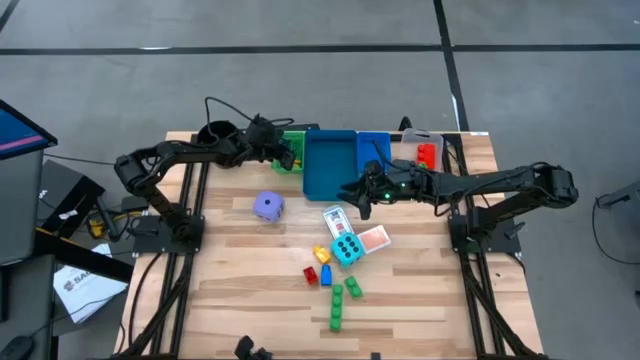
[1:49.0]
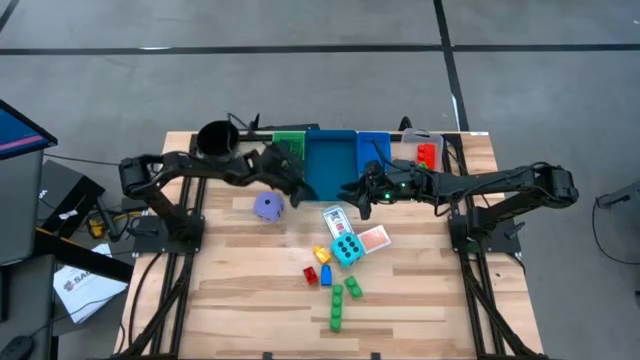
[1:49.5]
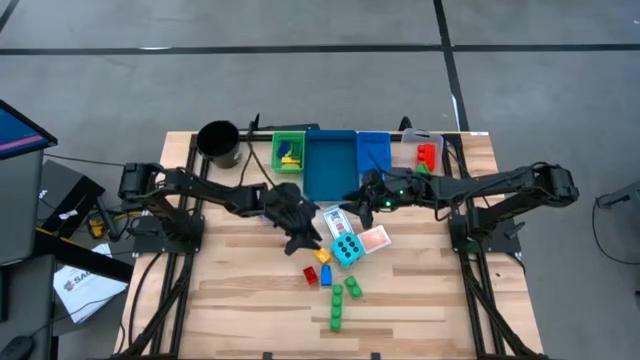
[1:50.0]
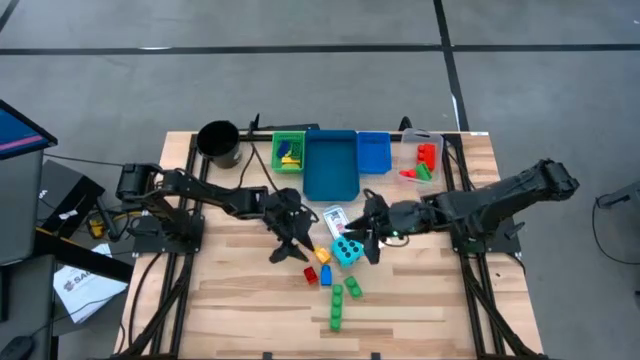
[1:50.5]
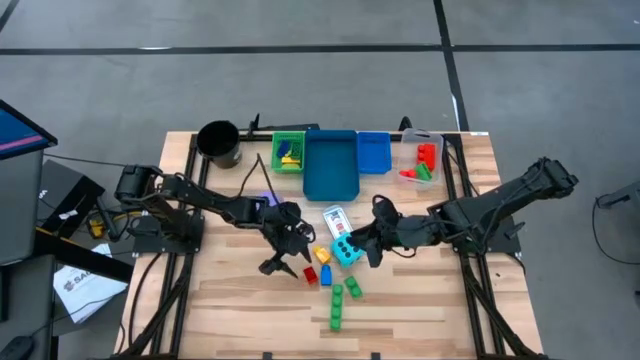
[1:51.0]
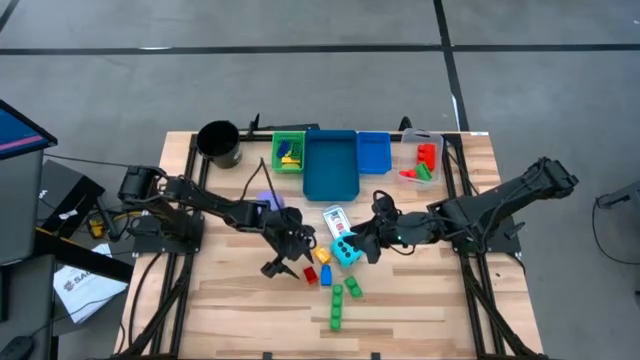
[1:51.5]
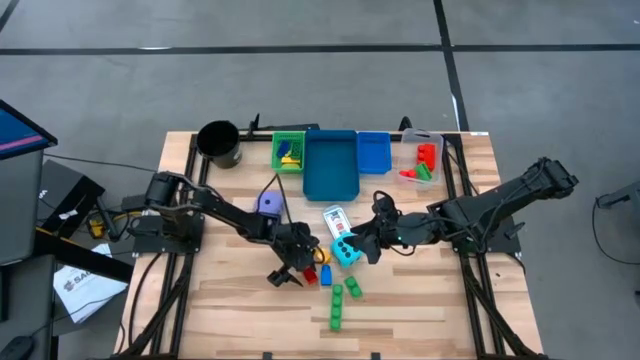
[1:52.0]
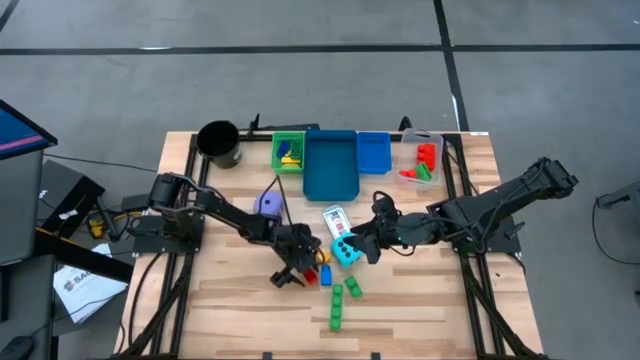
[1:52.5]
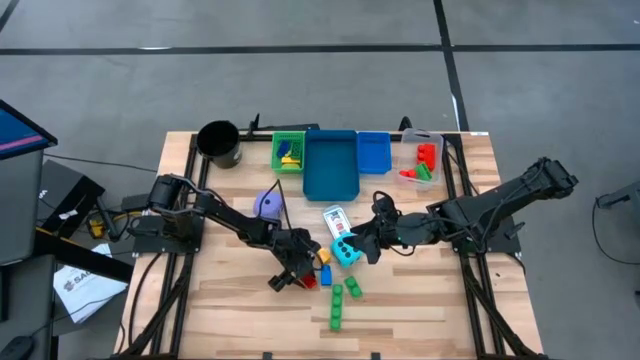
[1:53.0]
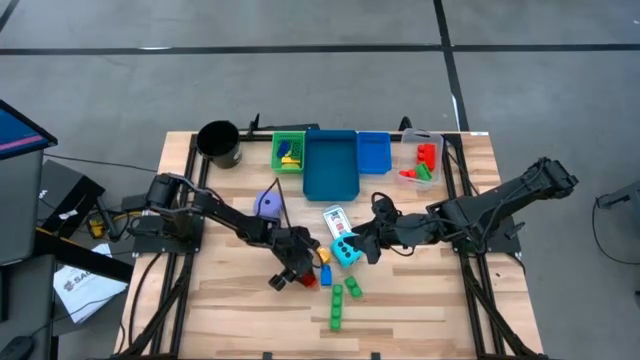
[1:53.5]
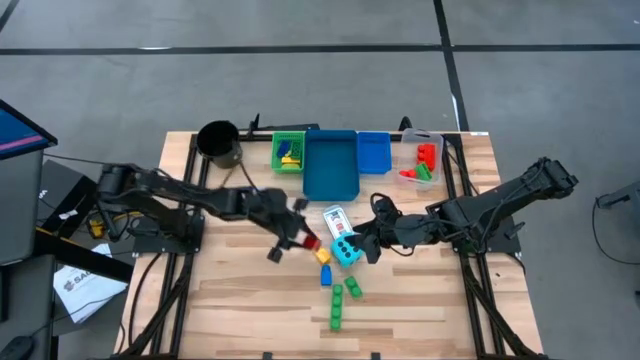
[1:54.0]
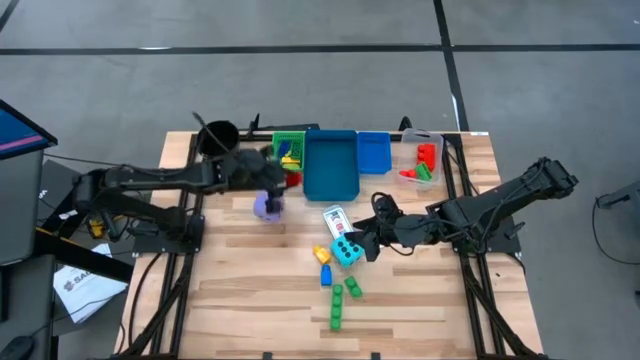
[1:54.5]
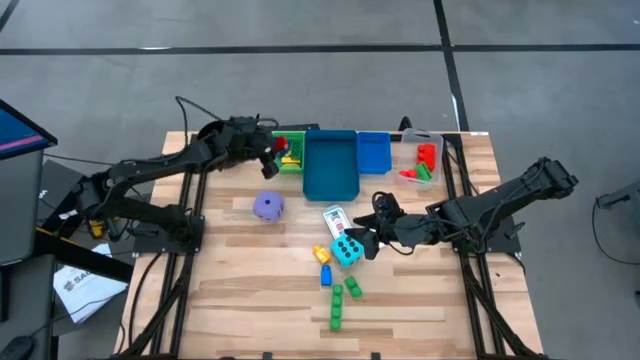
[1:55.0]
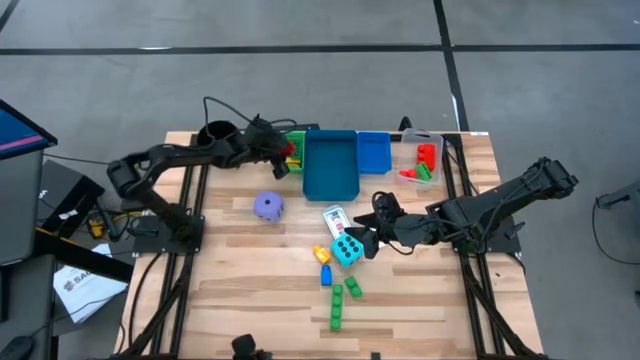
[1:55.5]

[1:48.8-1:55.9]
Task: Pick & Place Toys
Put the small red game piece into the green bin

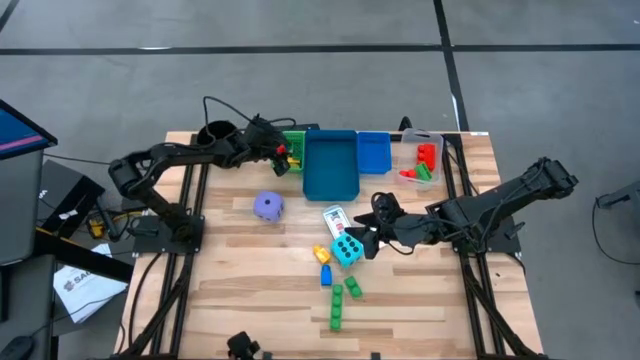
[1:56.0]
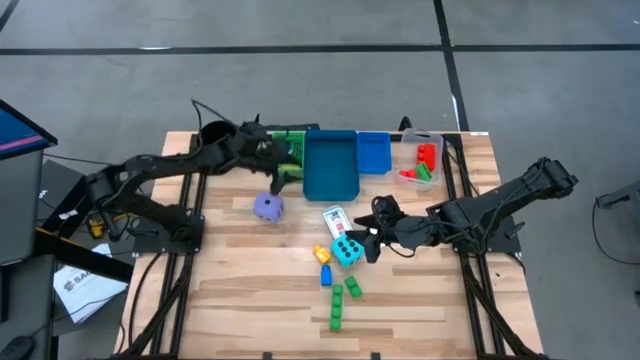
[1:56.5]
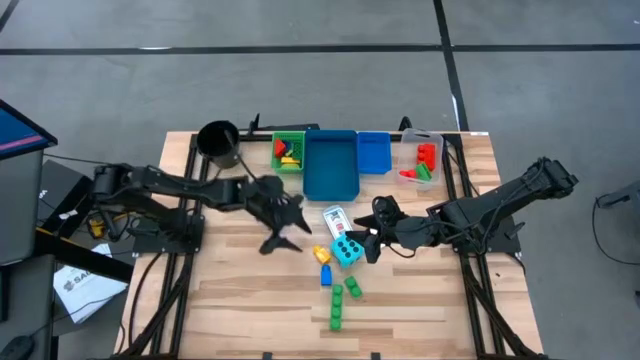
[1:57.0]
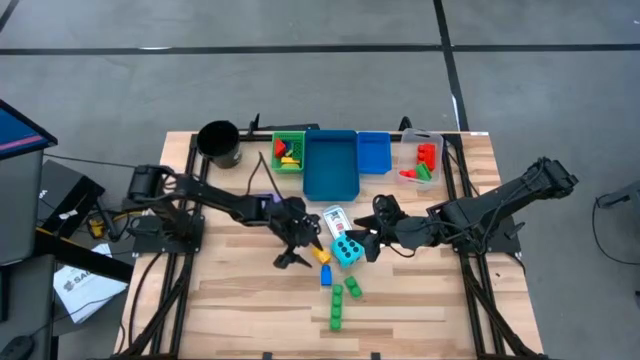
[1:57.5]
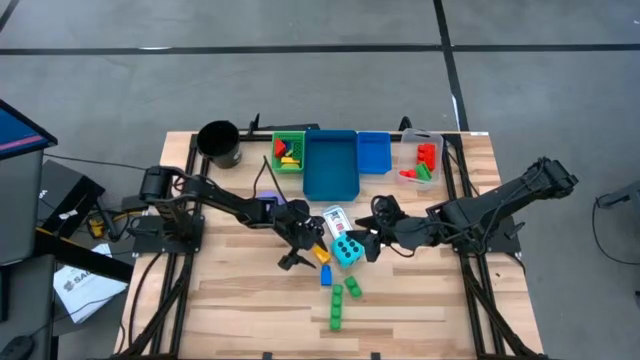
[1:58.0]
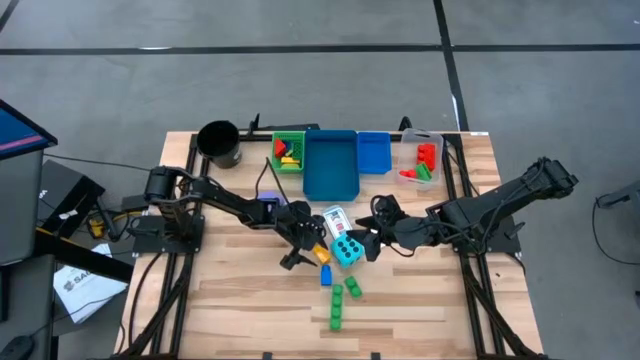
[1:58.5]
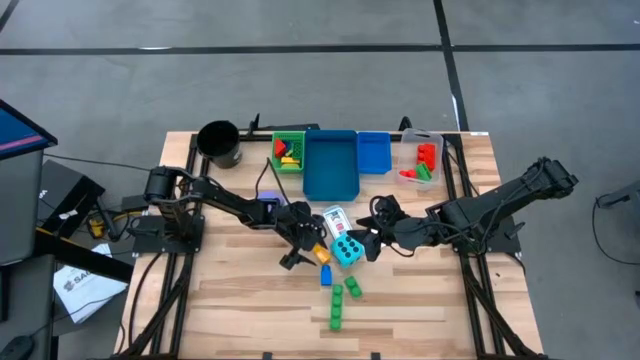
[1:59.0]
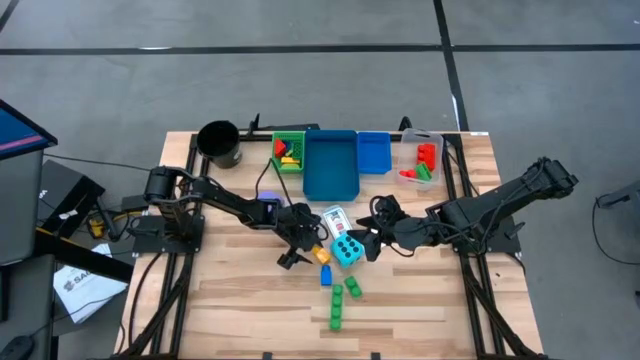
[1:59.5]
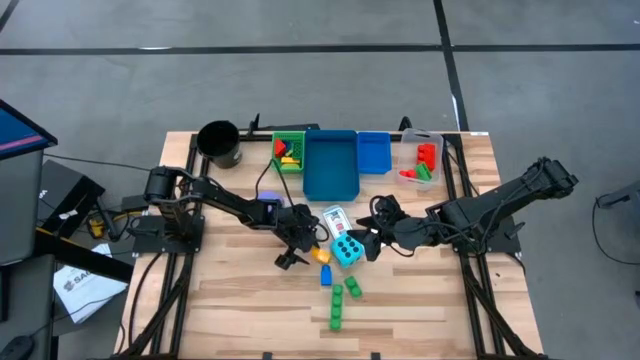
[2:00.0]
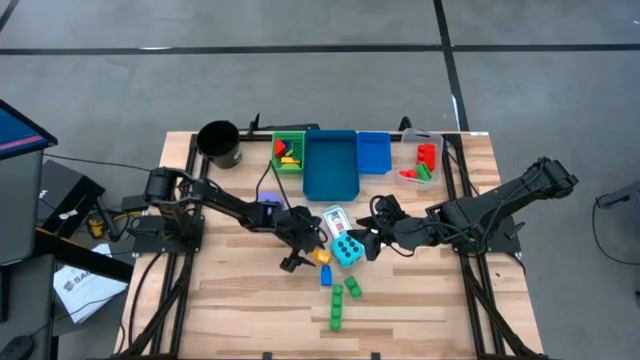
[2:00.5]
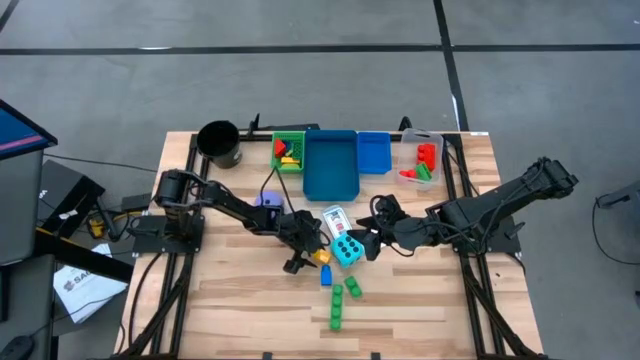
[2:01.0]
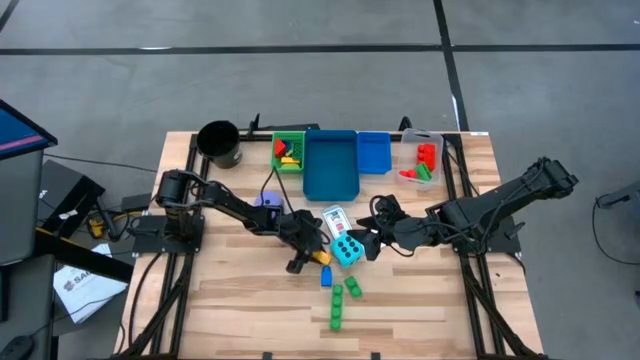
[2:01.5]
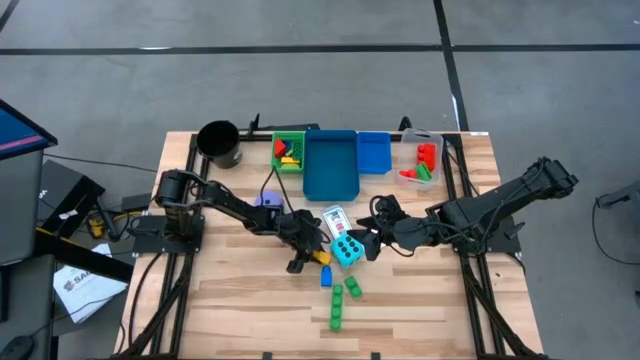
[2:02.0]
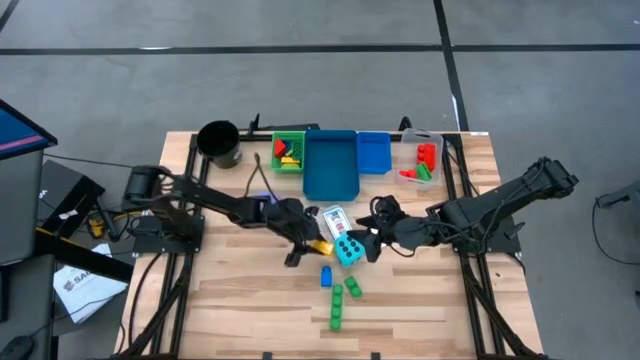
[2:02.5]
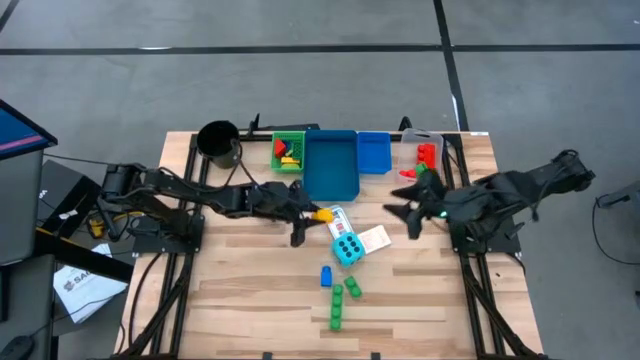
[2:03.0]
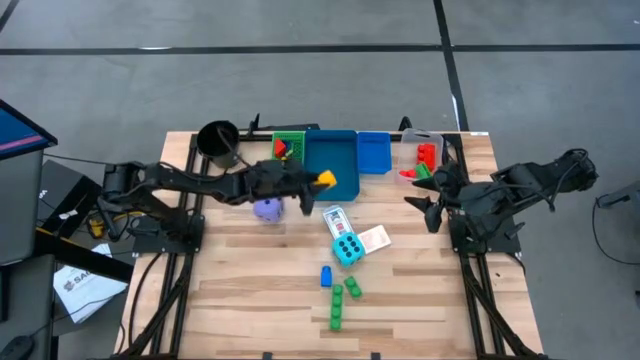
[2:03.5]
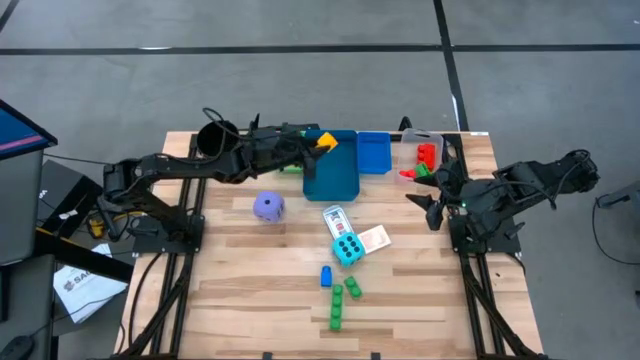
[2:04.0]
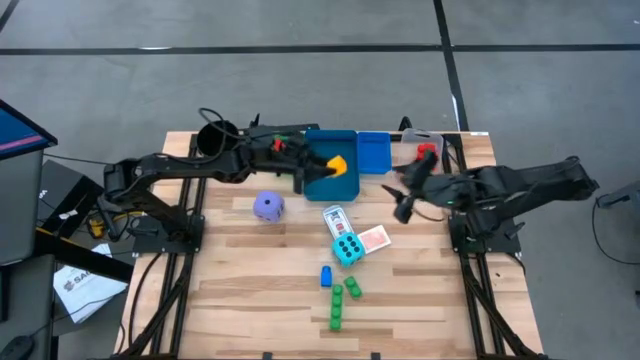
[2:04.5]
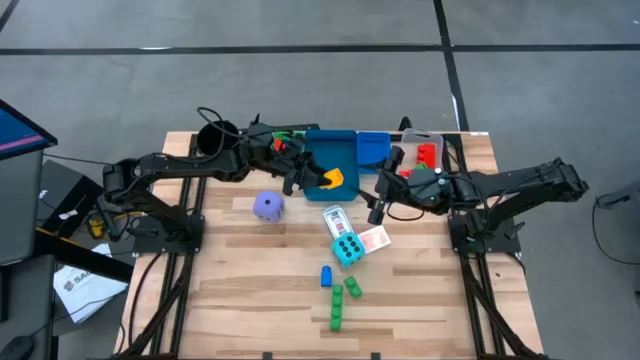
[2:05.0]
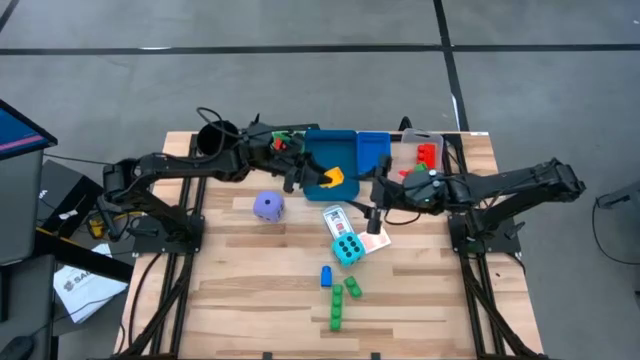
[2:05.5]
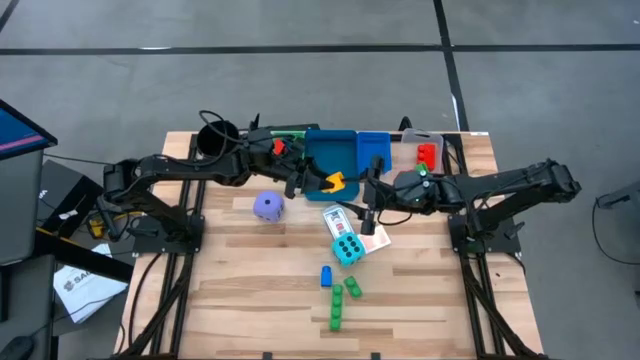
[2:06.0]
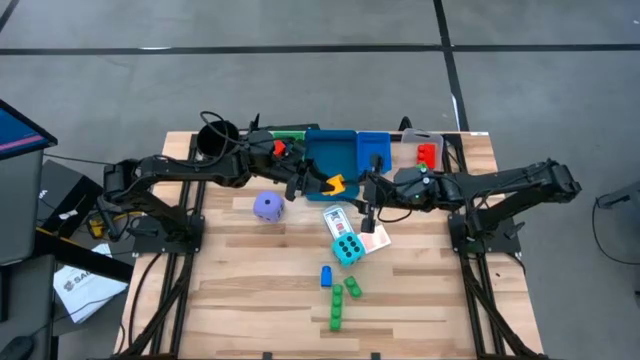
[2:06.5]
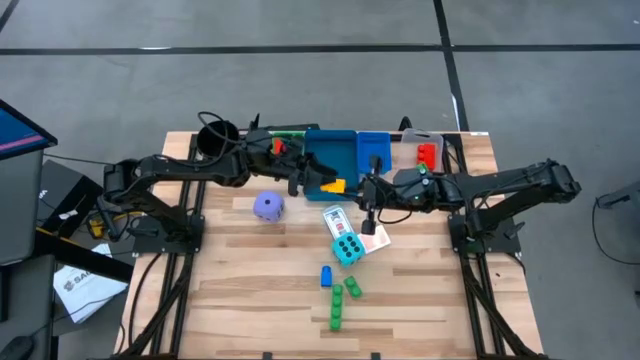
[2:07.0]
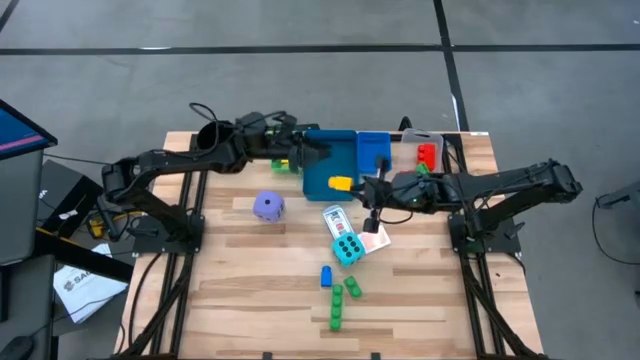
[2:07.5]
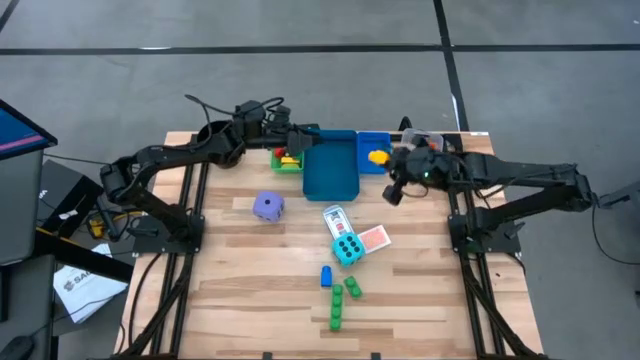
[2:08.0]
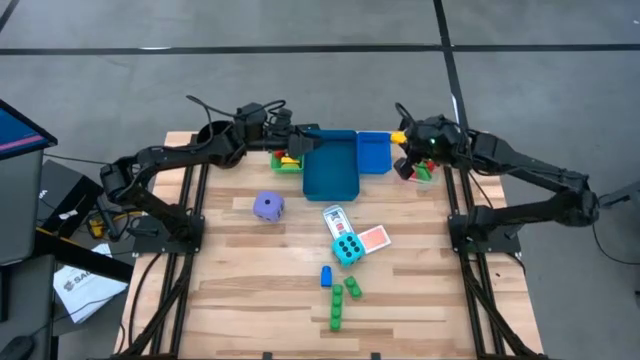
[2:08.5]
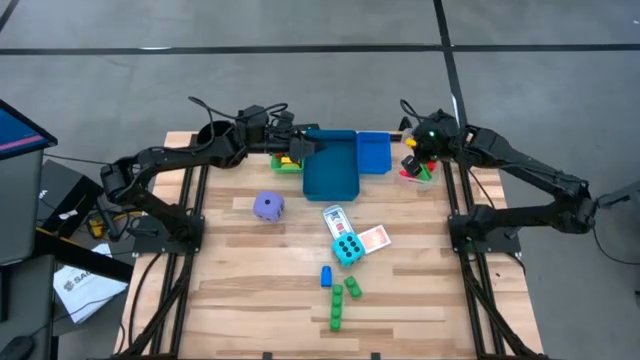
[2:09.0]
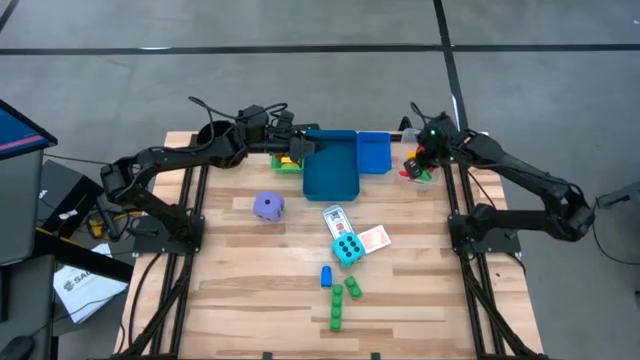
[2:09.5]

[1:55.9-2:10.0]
Put the large yellow game piece into the transparent bin
